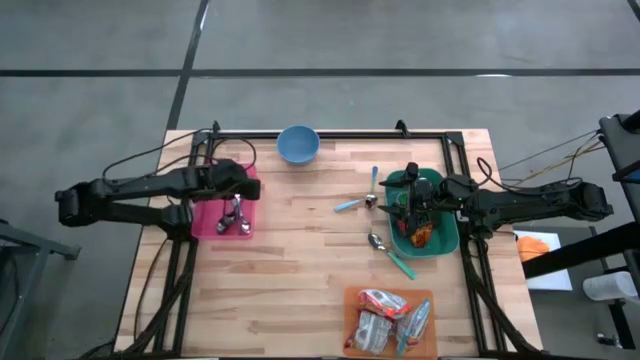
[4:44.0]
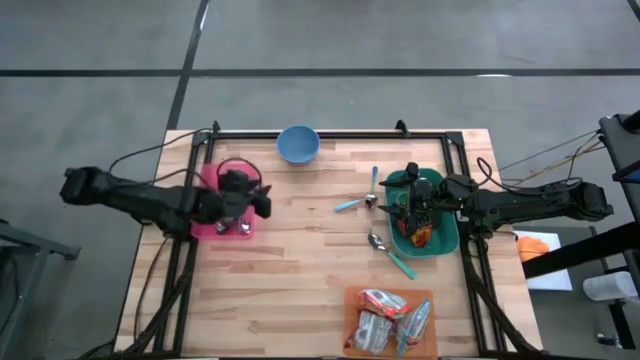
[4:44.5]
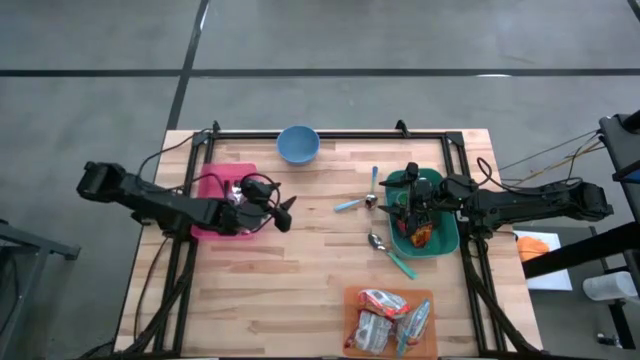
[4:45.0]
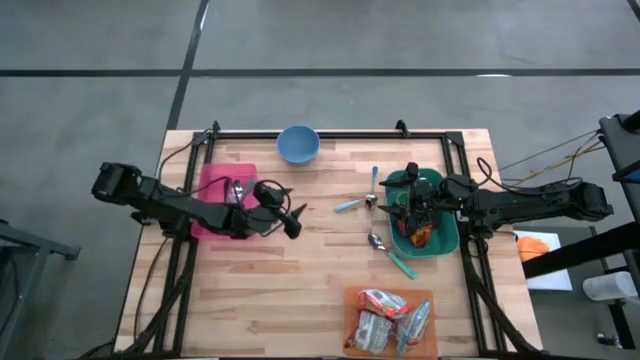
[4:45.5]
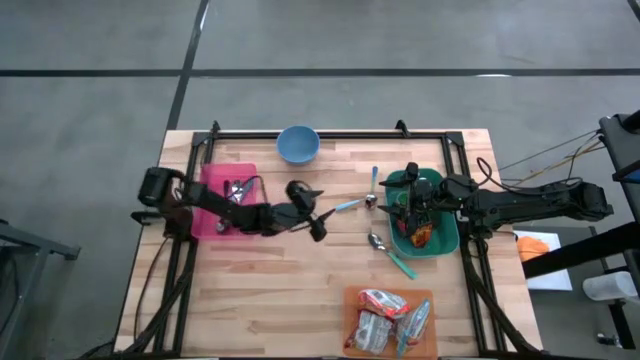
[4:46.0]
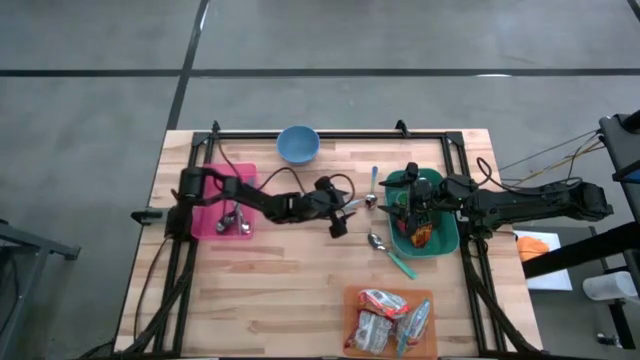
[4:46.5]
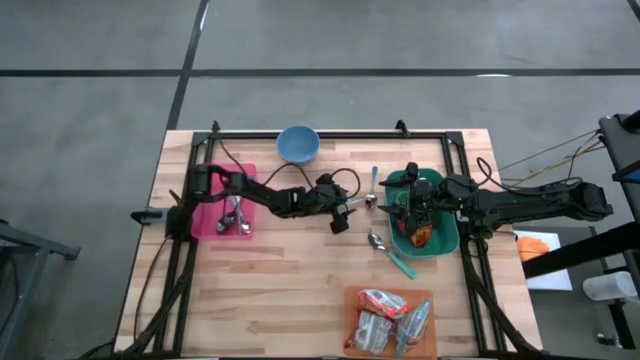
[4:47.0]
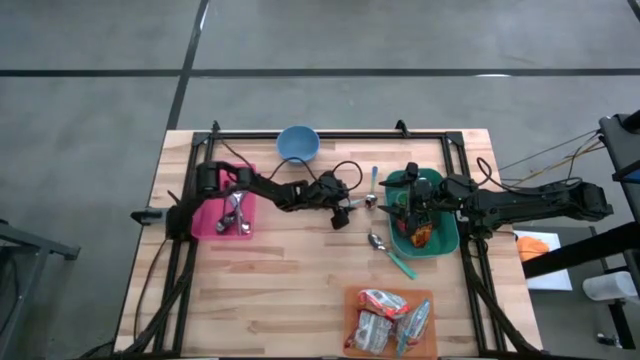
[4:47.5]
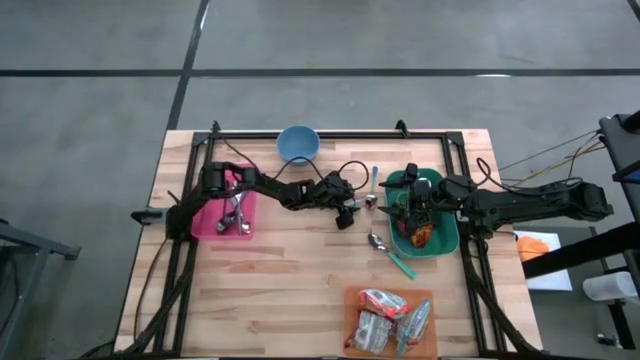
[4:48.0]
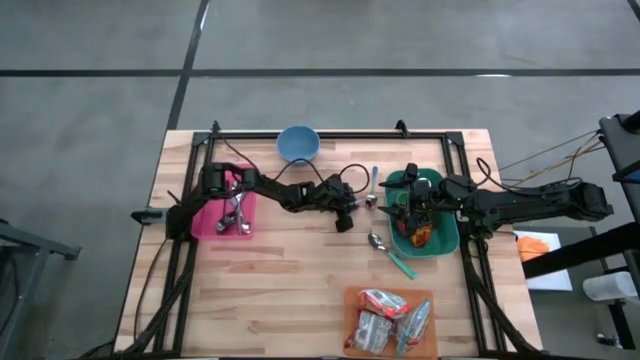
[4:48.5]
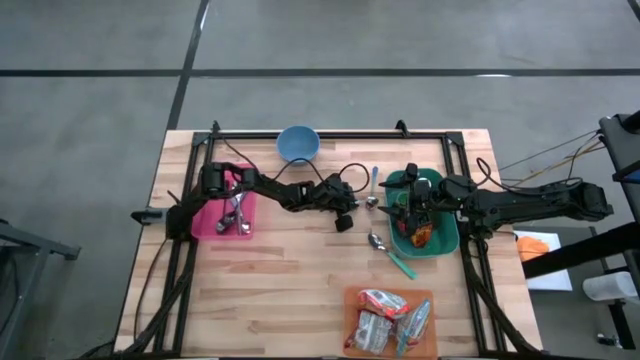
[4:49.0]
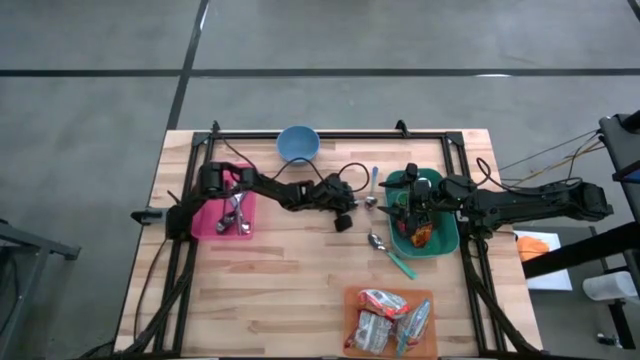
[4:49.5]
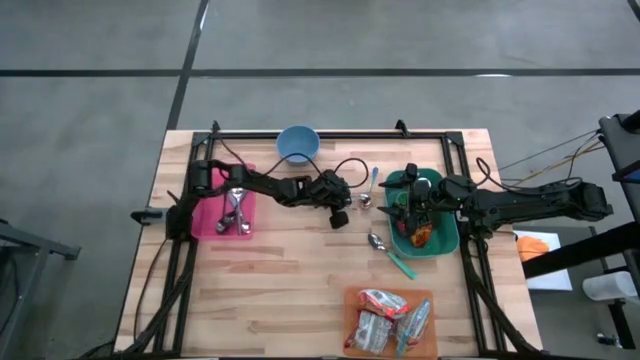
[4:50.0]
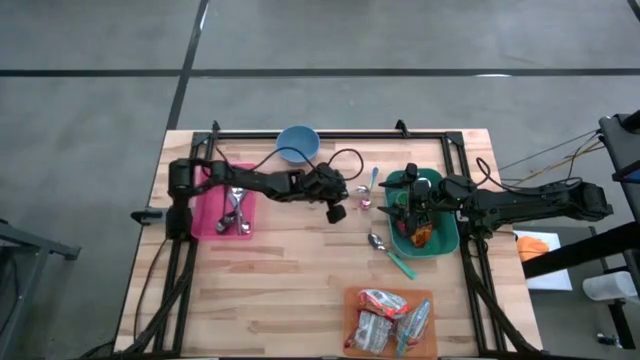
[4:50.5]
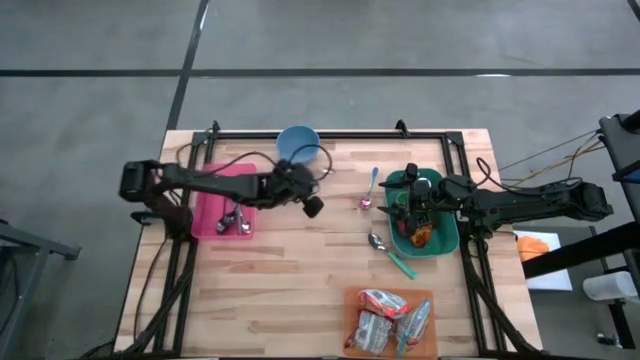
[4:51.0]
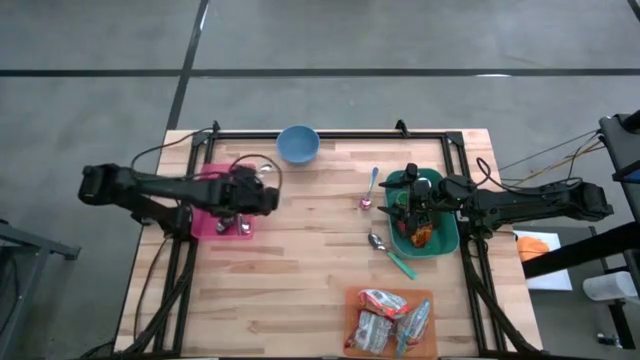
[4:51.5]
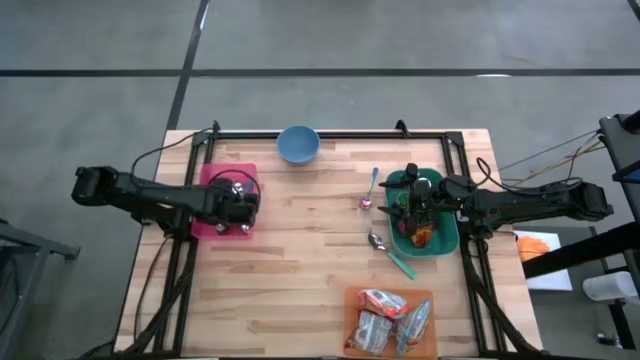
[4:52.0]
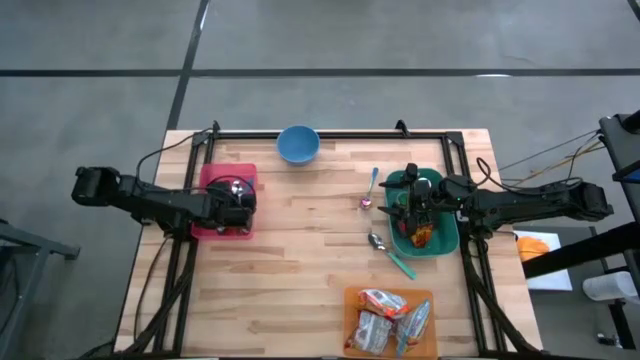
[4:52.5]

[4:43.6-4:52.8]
Put the light blue spoon into the pink bin

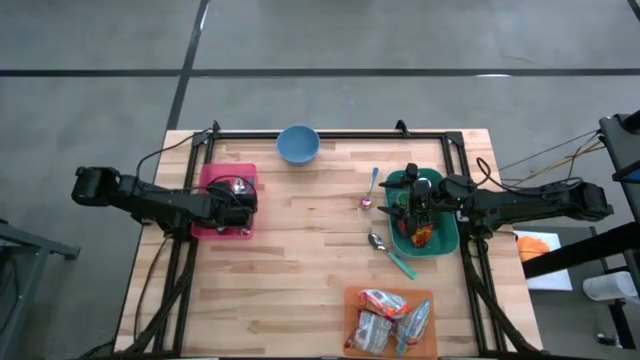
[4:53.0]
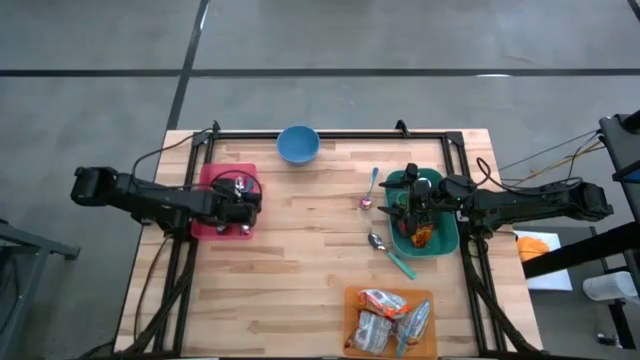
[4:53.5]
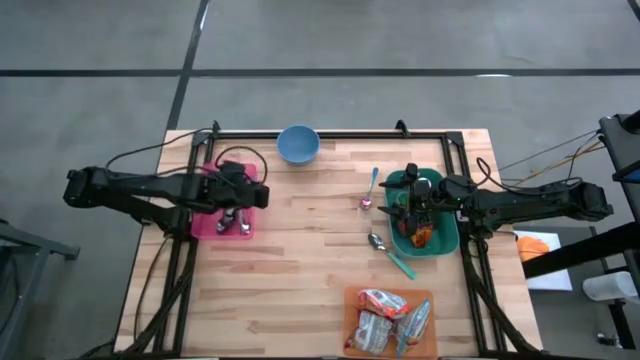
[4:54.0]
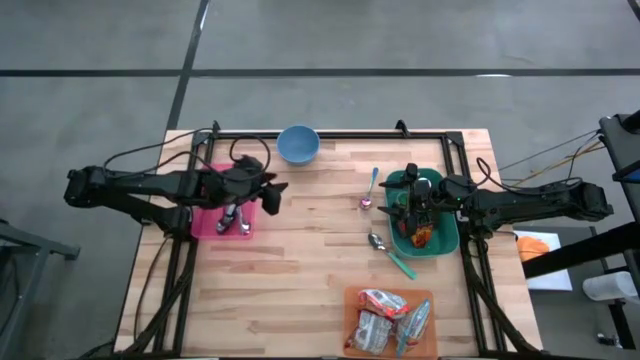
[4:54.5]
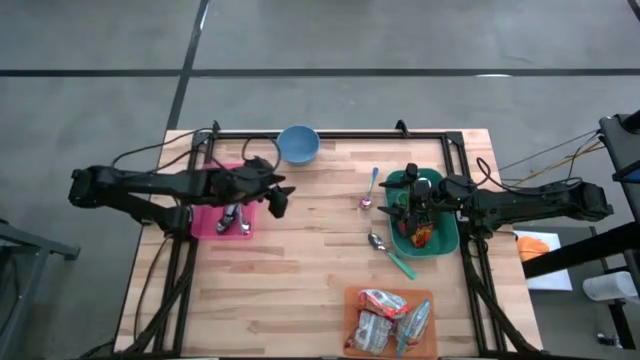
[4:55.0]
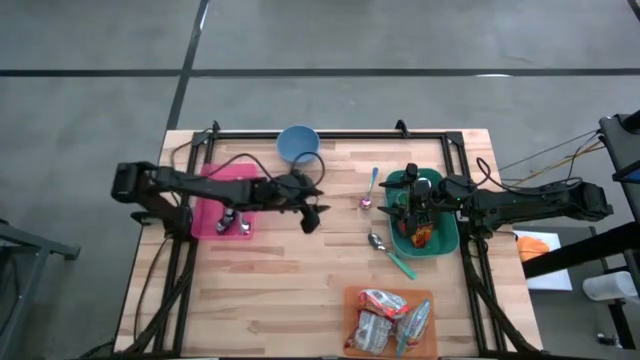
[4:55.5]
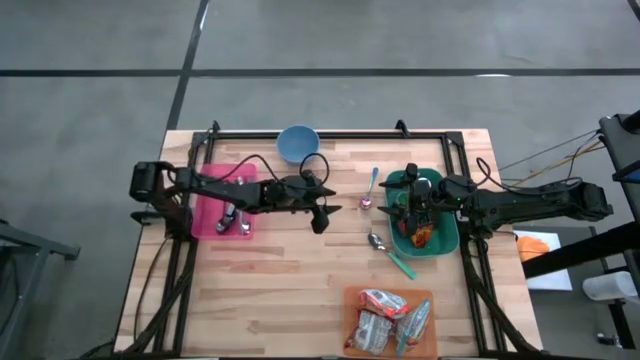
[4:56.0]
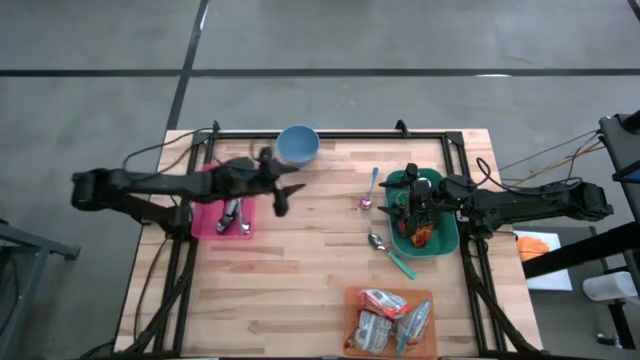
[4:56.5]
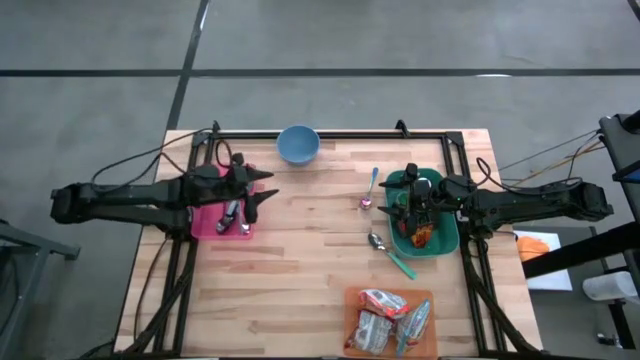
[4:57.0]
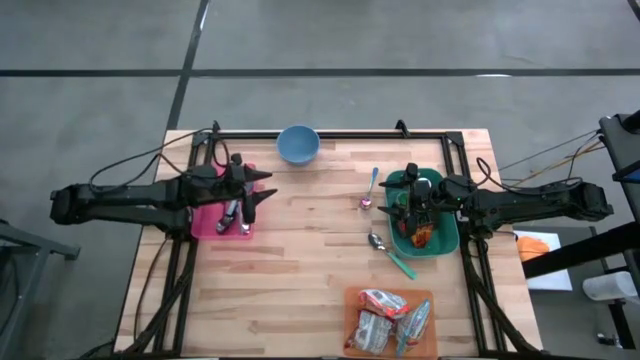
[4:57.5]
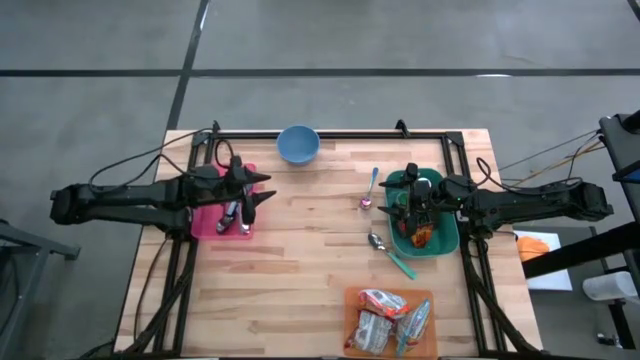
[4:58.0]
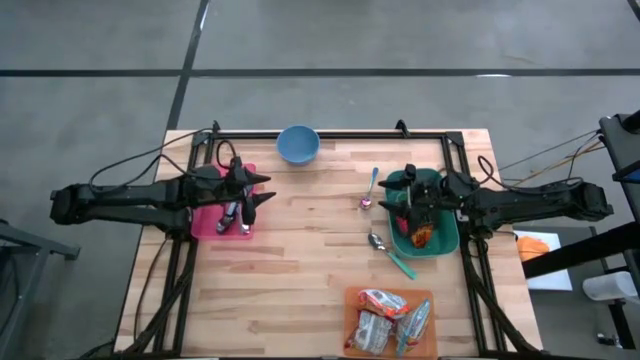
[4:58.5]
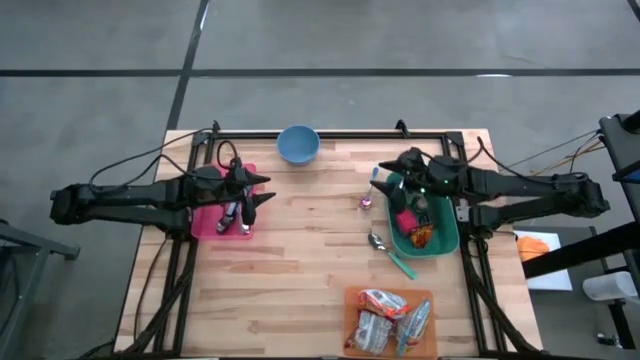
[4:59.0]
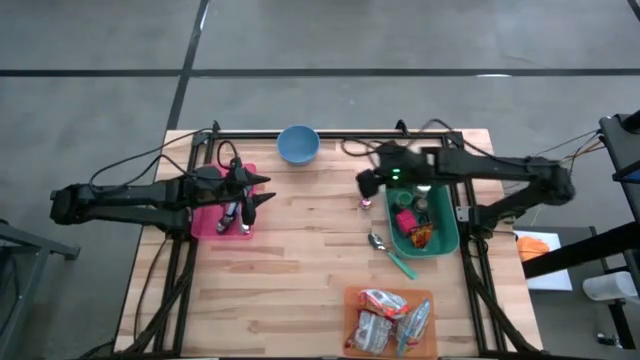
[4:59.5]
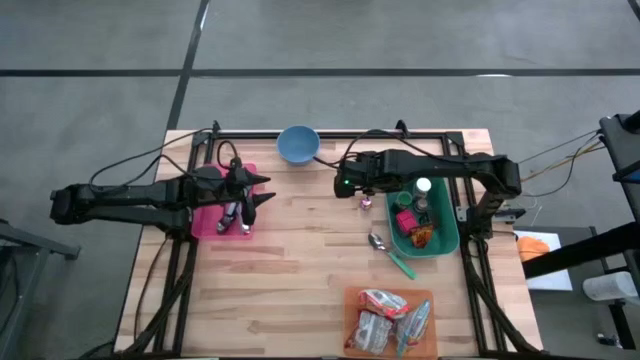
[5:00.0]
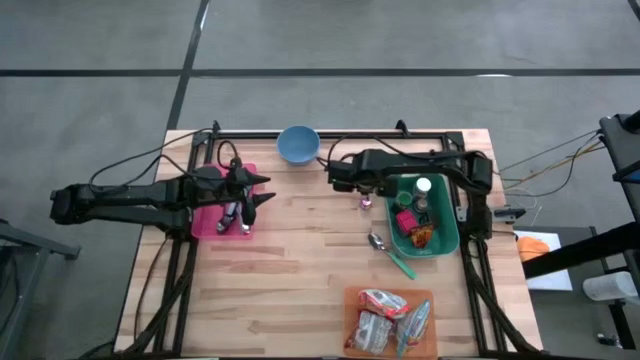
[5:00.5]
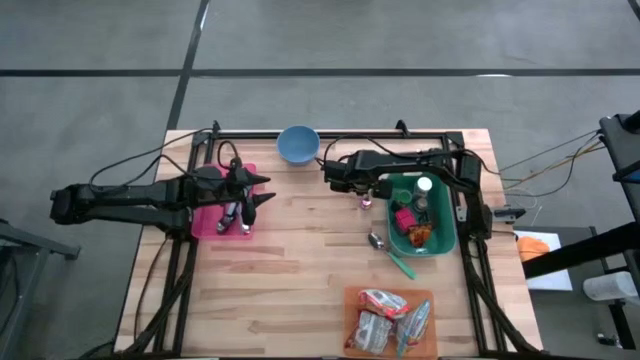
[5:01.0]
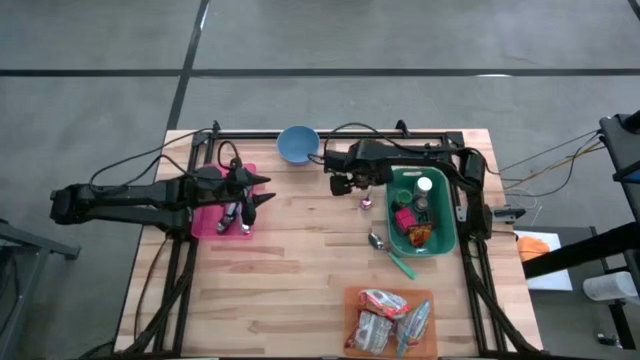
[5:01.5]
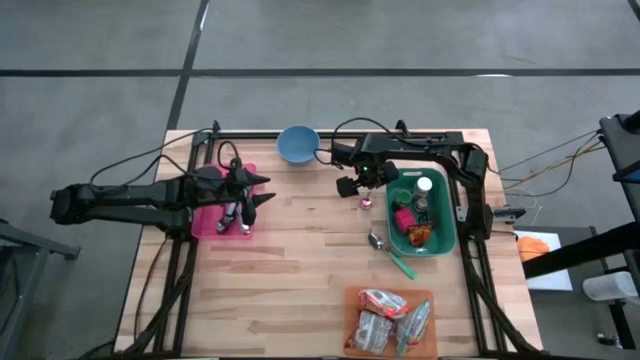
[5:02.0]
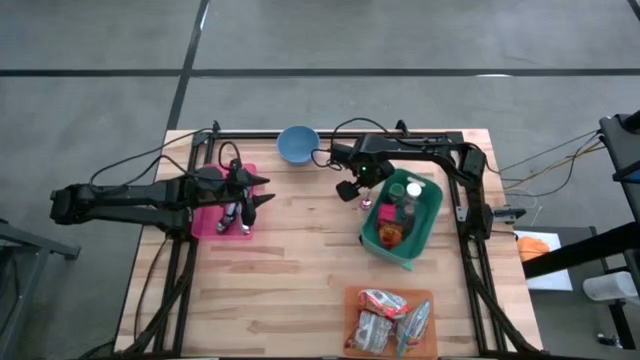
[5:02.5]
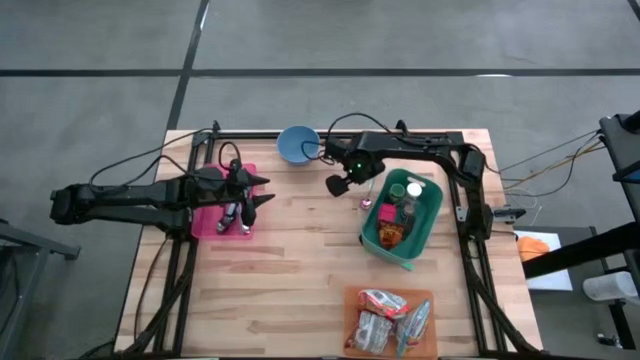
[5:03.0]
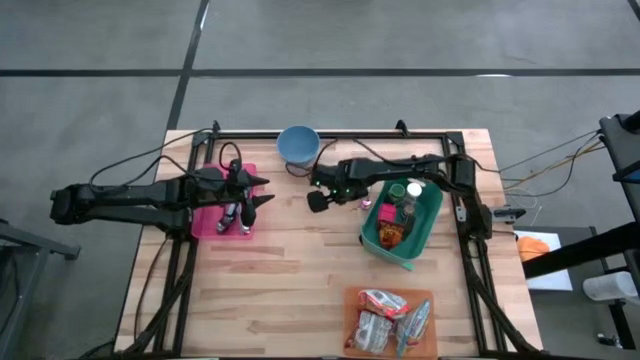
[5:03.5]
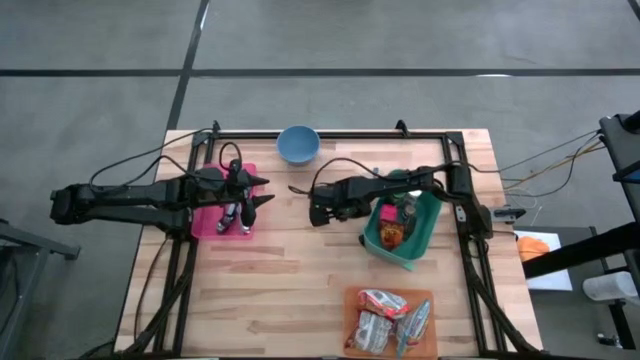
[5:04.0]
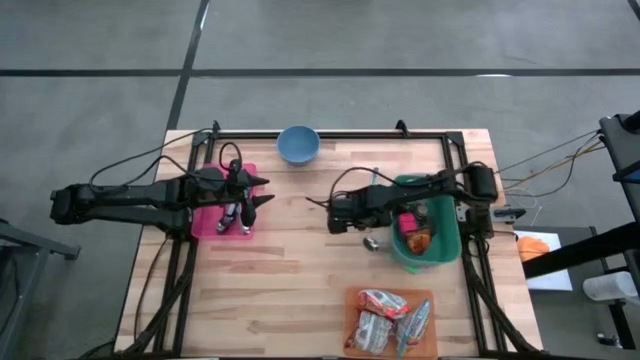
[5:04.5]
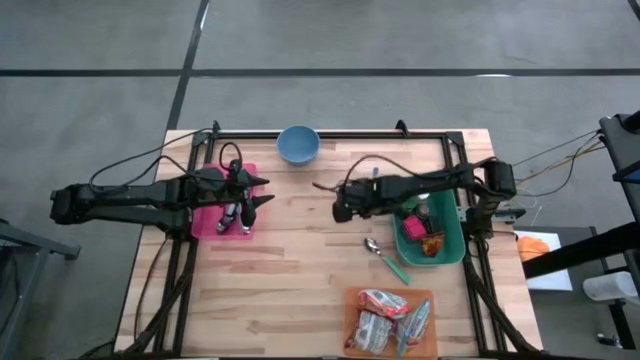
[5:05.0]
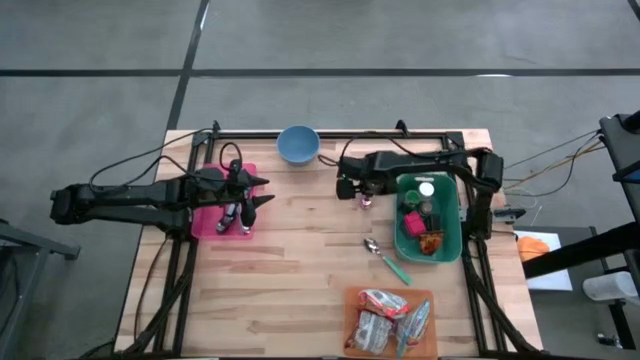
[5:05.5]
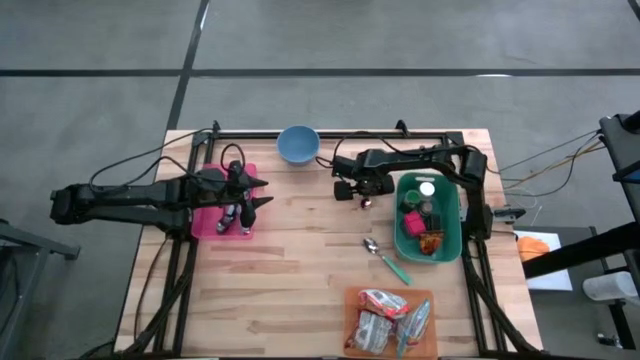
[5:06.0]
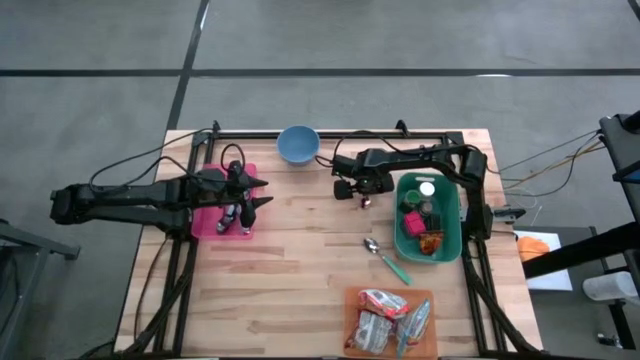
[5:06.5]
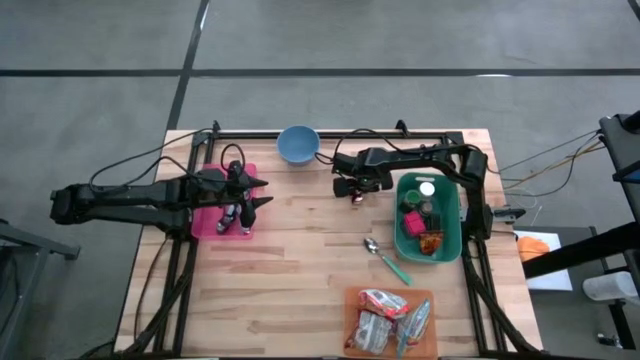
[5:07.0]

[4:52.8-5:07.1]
Put the purple spoon into the pink bin
